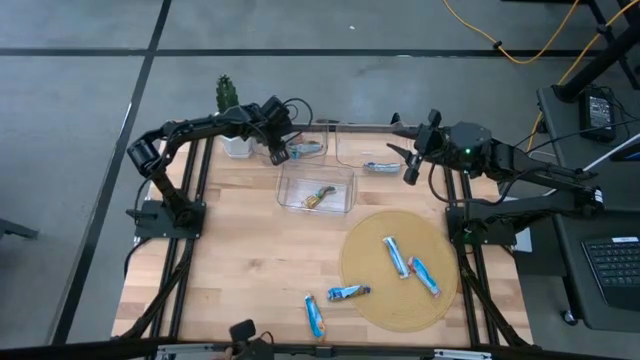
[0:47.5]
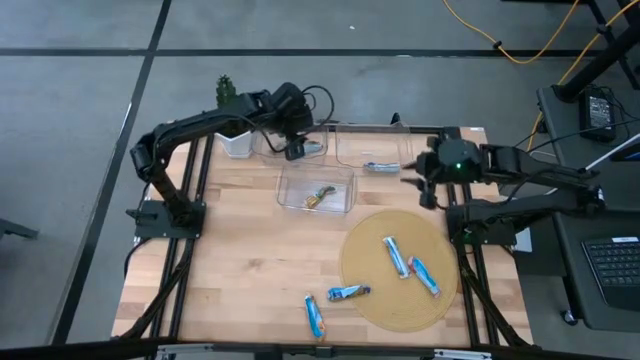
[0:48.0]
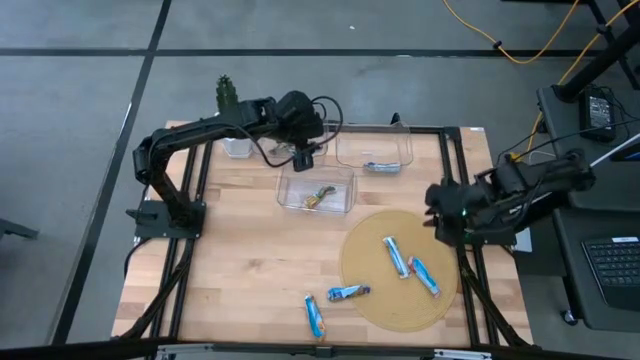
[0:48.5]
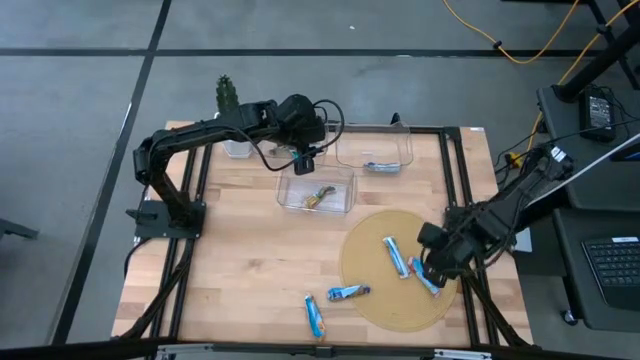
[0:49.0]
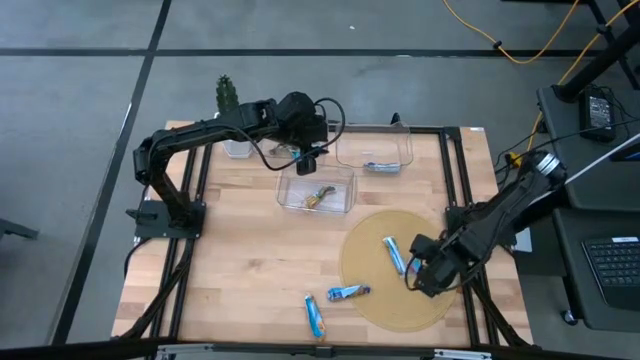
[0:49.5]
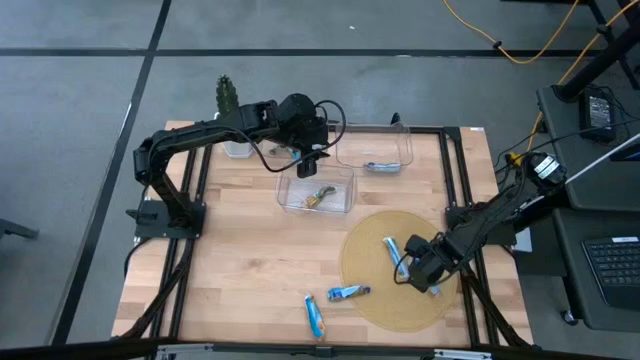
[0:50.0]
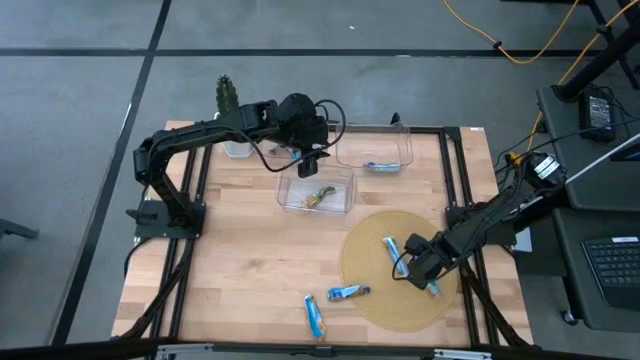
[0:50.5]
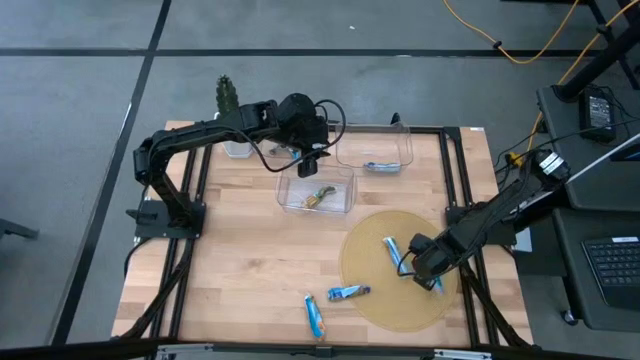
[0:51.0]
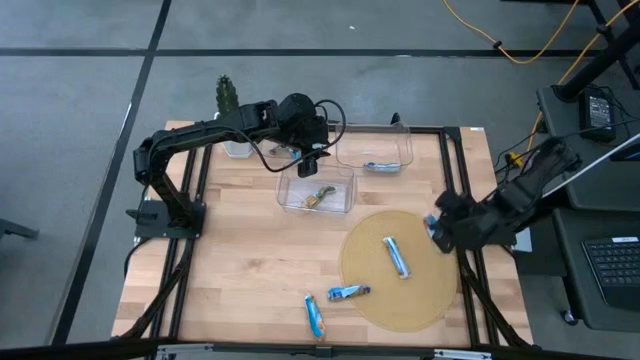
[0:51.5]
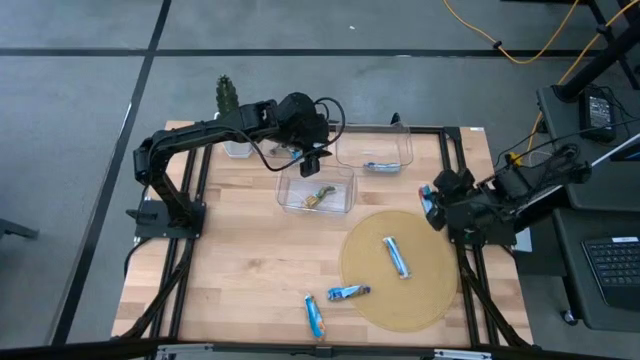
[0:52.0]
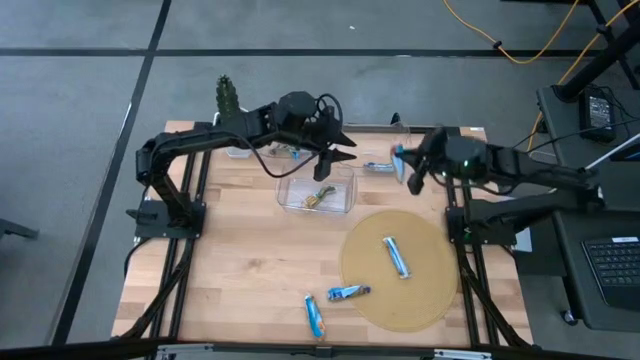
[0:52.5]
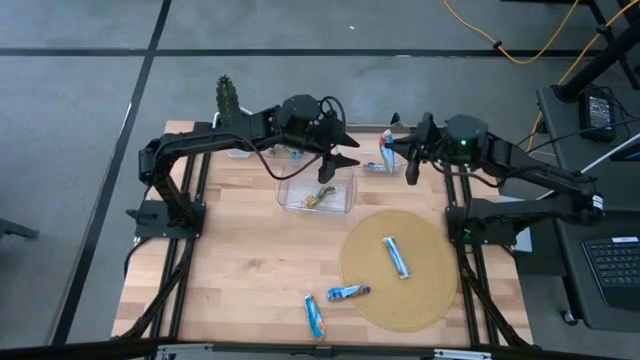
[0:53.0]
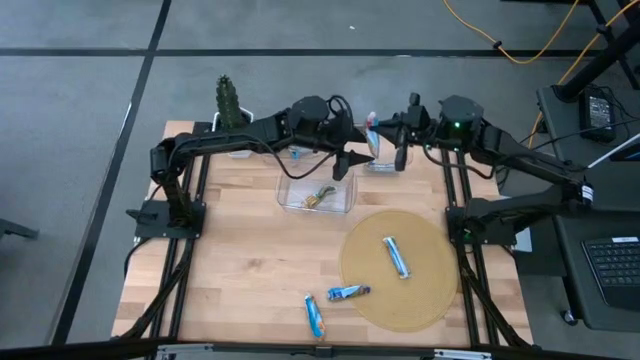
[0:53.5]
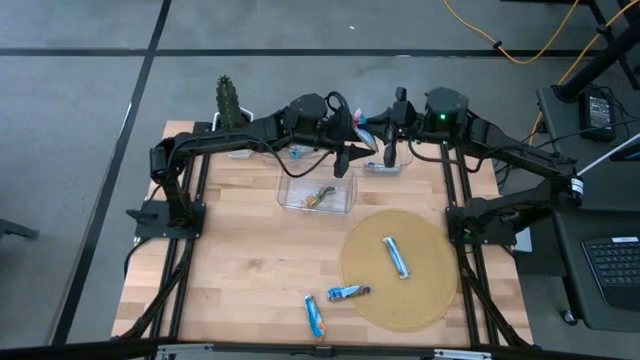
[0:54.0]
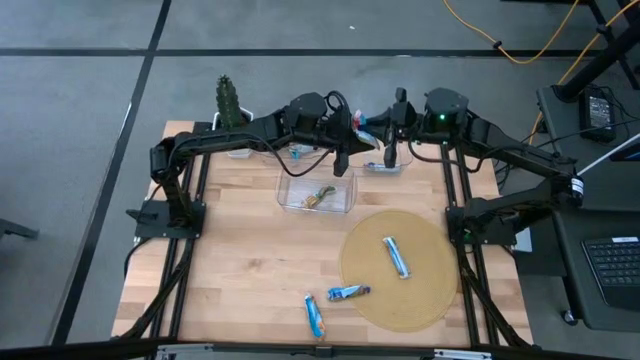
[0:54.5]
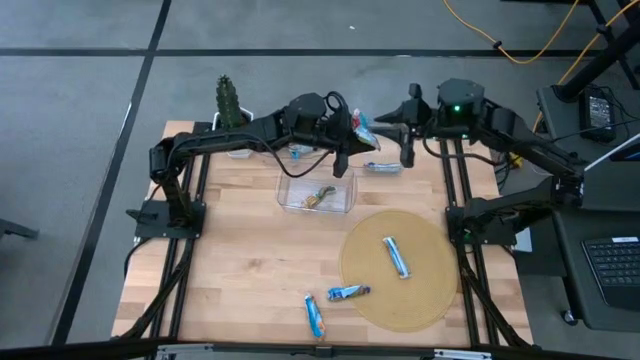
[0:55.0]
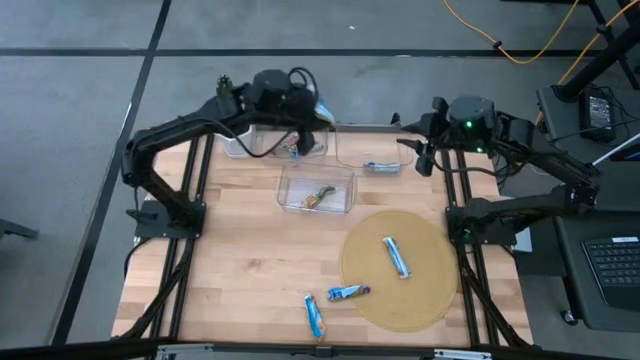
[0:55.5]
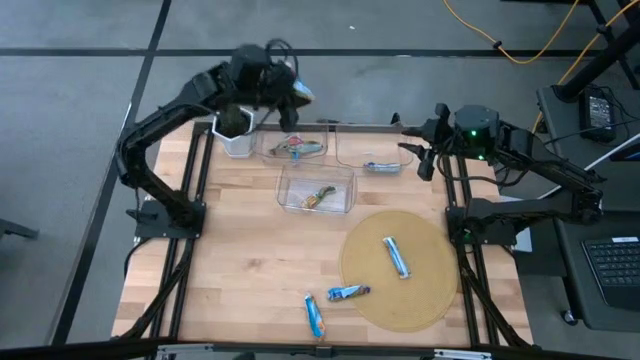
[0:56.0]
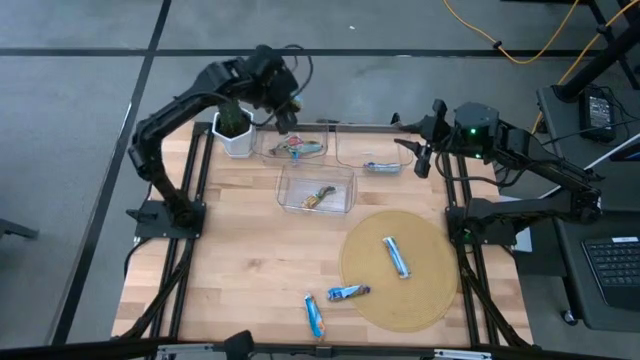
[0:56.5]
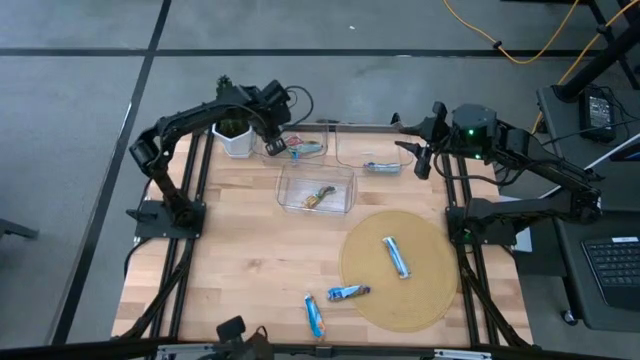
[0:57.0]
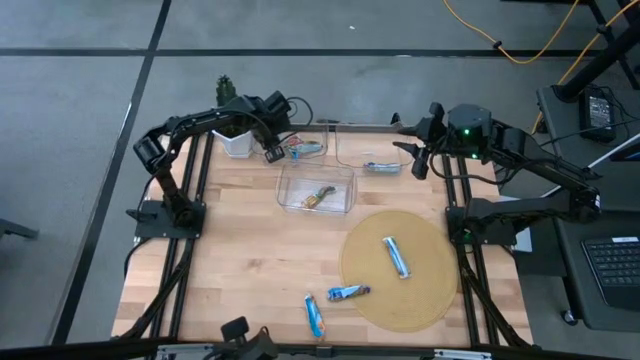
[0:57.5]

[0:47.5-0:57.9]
Task: Pick and place Granola Bars by type
Put the red granola bar into the top left transparent bin

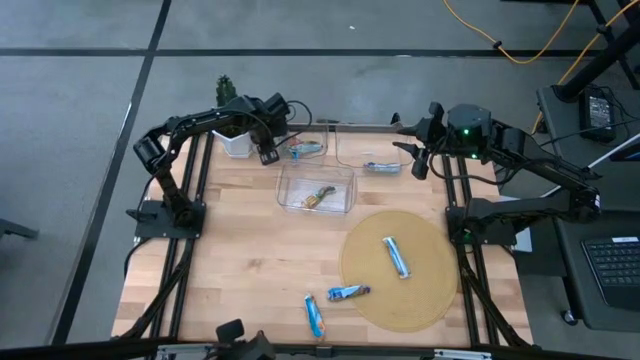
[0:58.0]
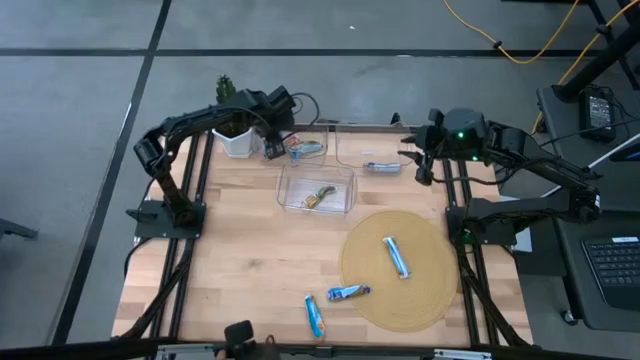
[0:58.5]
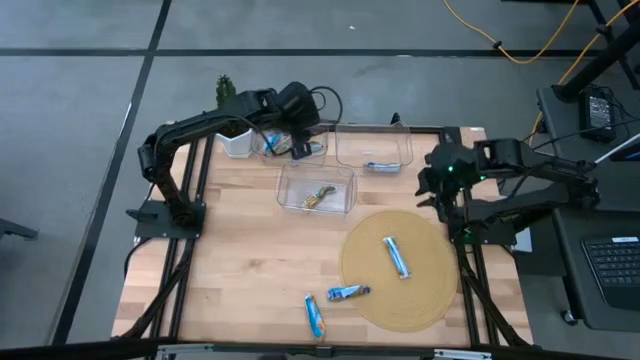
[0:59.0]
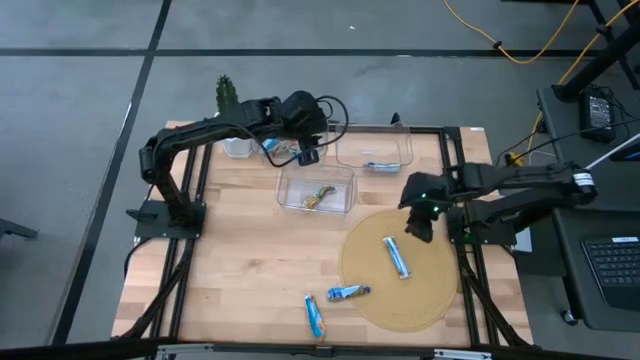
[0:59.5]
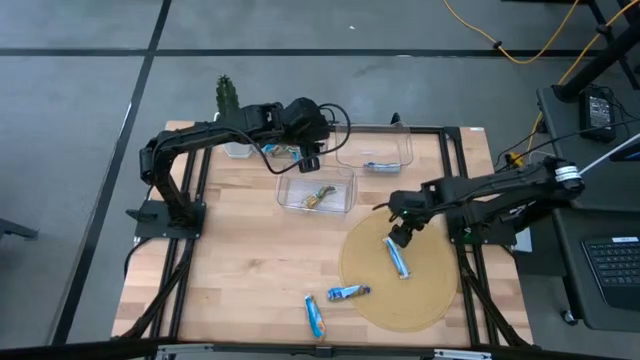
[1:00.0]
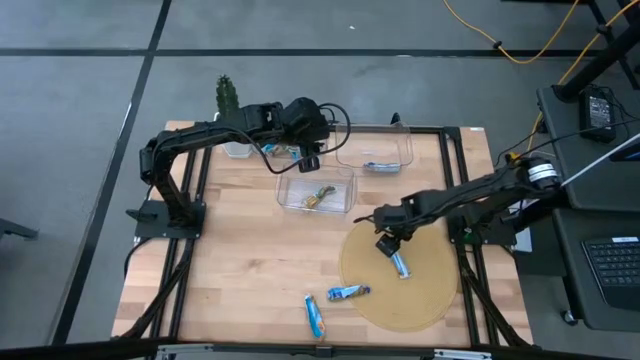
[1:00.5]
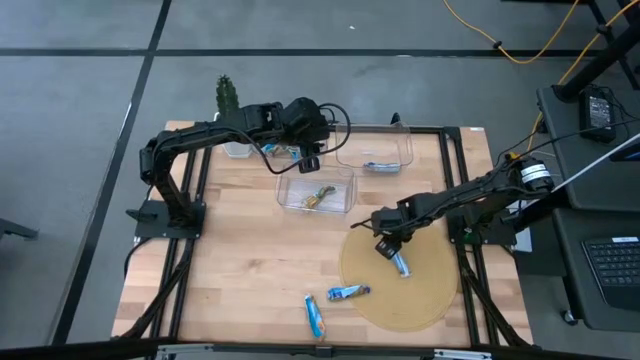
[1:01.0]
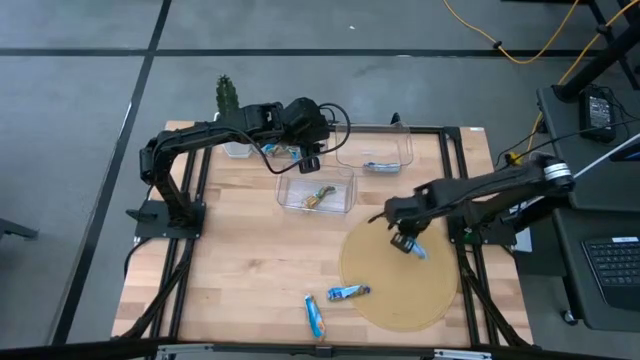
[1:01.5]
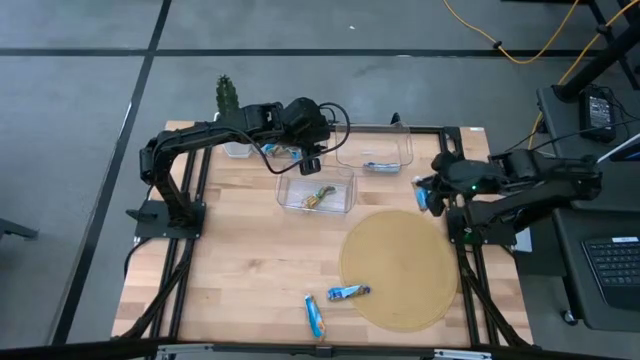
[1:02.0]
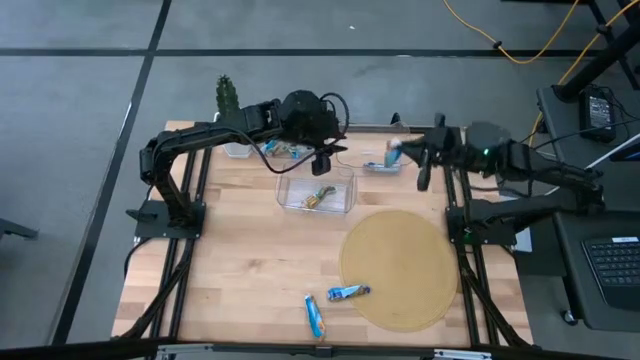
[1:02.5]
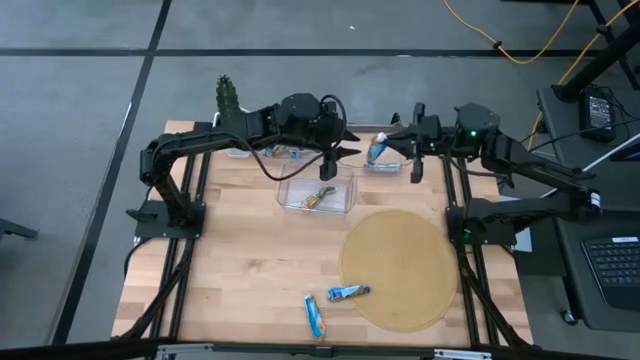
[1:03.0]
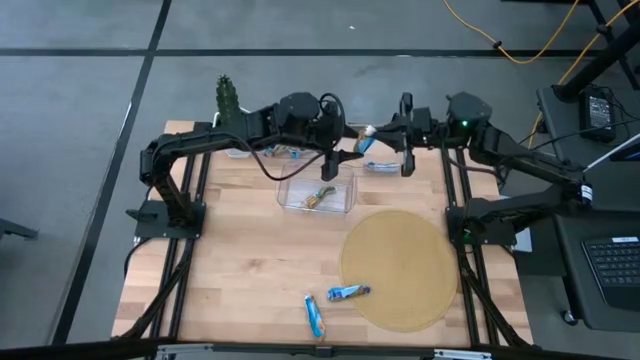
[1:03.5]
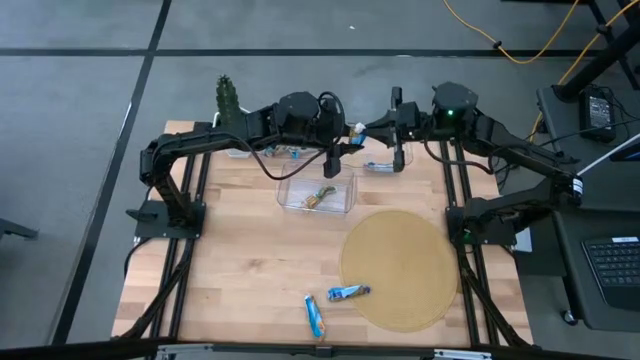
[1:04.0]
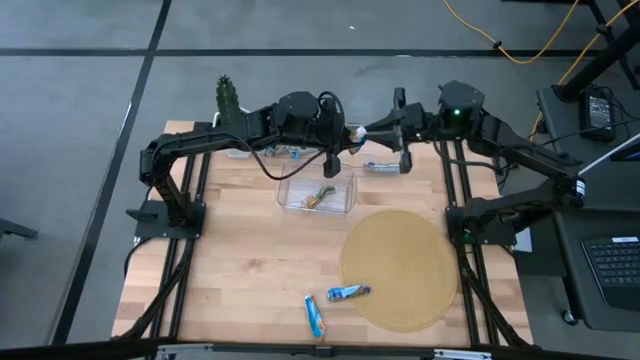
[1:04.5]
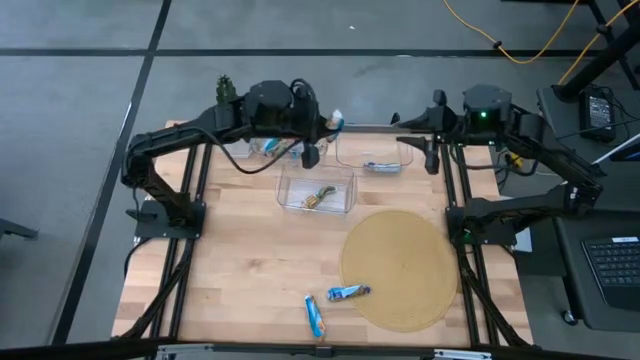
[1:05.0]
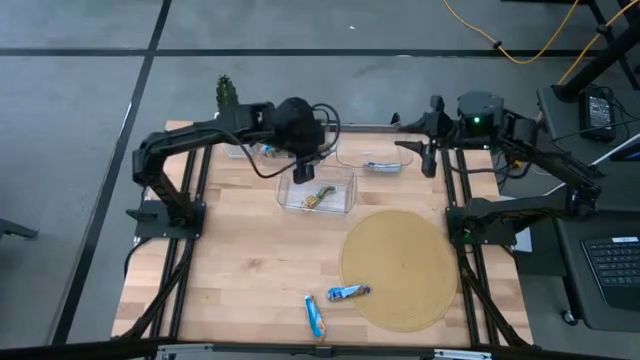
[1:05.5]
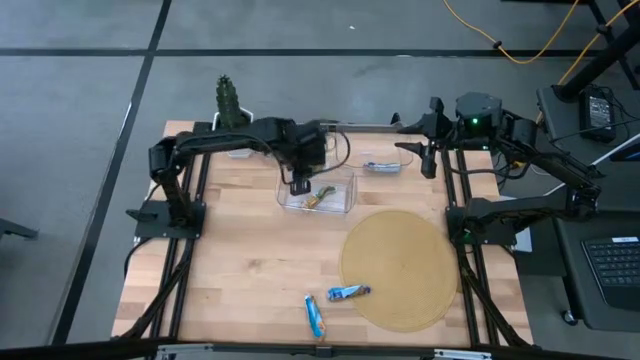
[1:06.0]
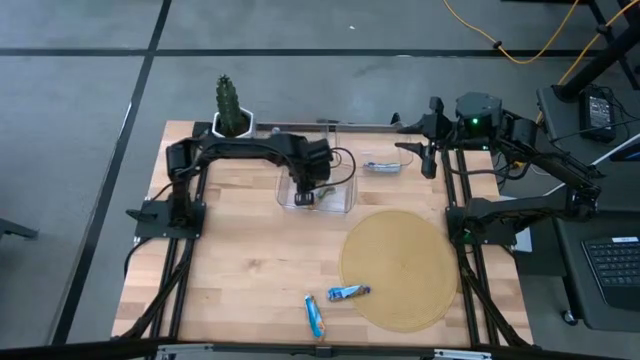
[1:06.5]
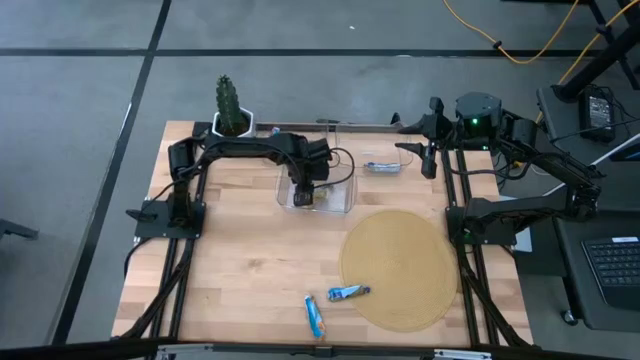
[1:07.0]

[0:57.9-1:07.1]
Put the yellow granola bar into the bottom transparent bin

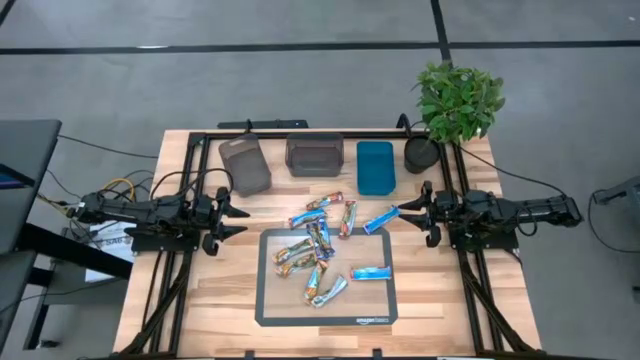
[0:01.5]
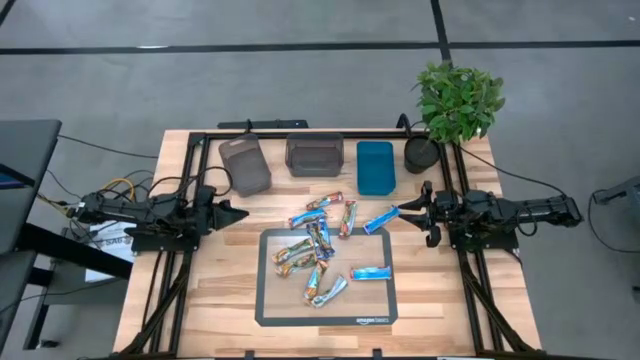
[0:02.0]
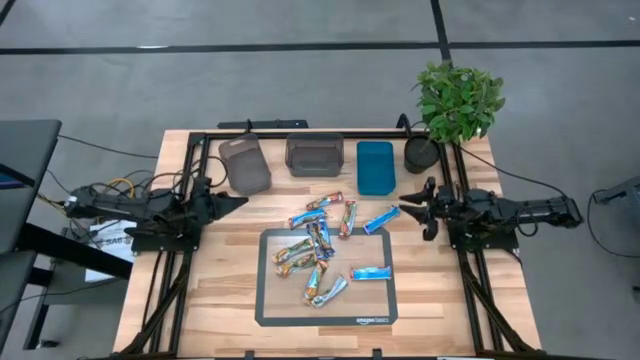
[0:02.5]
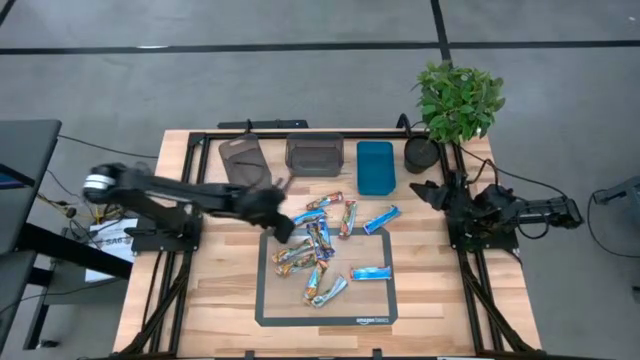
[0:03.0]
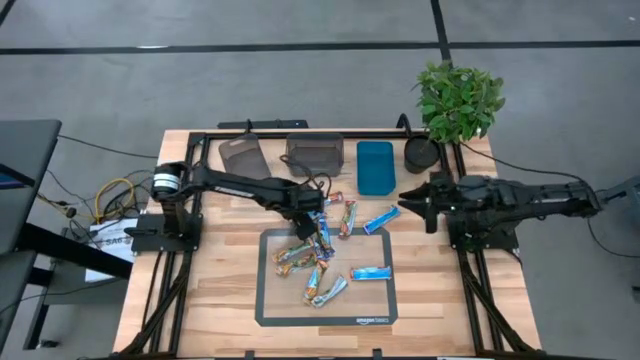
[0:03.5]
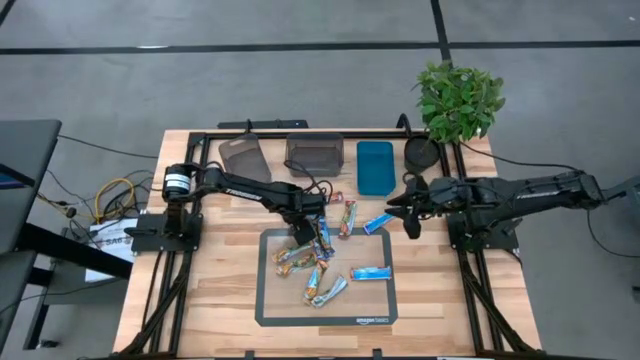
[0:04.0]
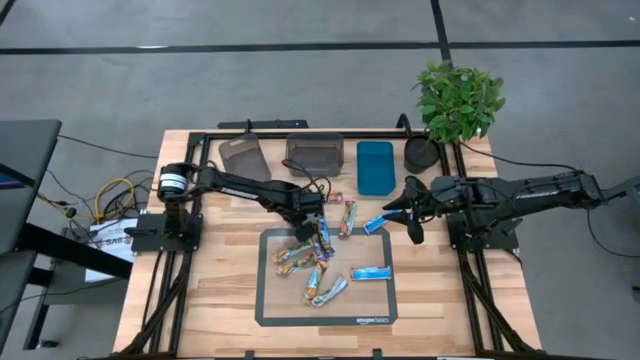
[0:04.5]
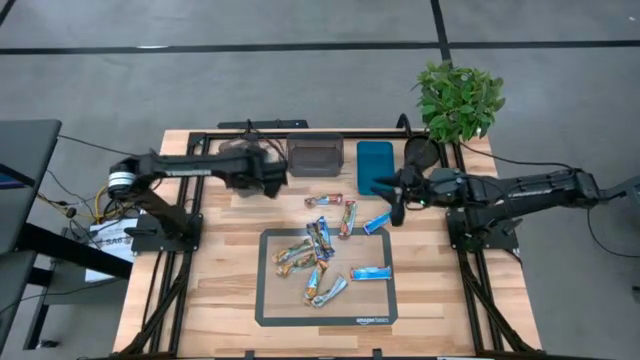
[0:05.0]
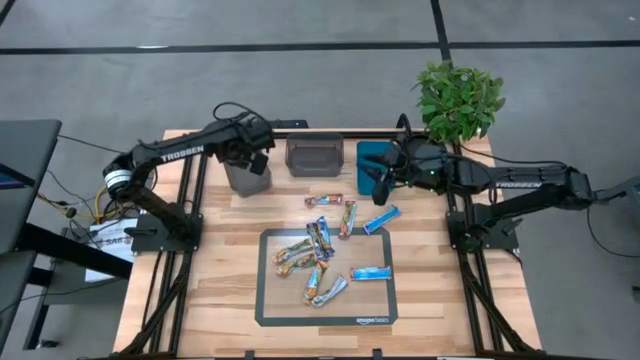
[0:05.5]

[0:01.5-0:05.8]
Task: Pick and place Granola Bars by type
Put the red granola bar into the left black bin
